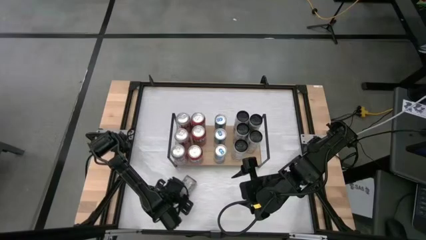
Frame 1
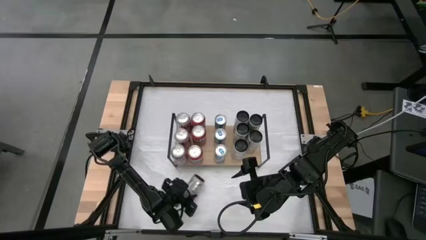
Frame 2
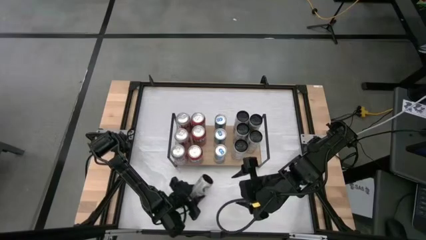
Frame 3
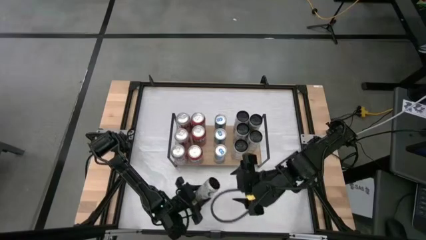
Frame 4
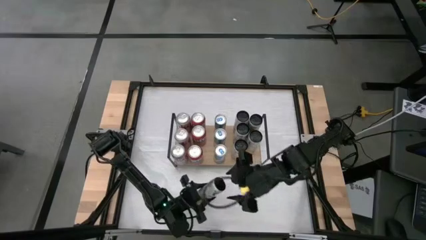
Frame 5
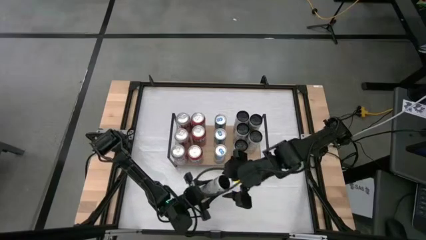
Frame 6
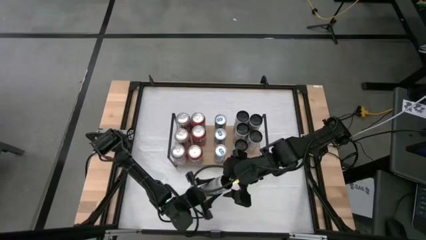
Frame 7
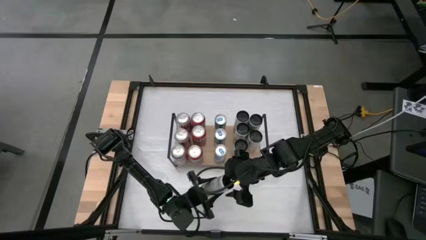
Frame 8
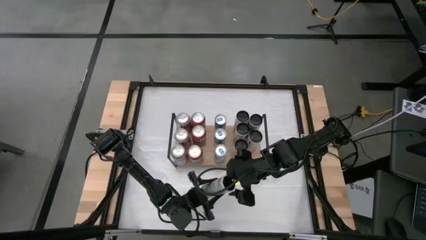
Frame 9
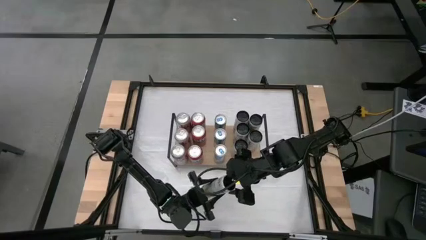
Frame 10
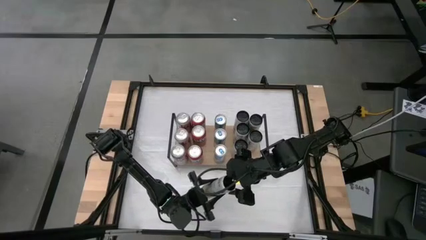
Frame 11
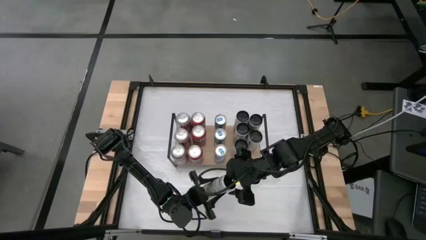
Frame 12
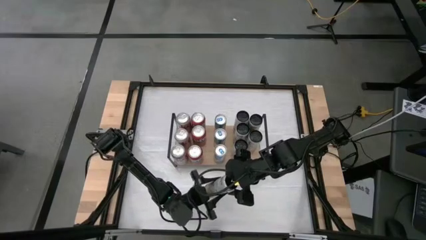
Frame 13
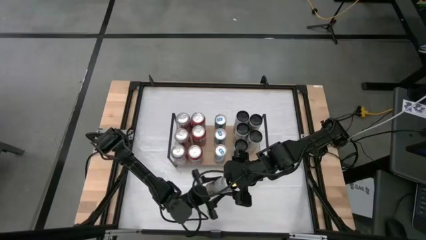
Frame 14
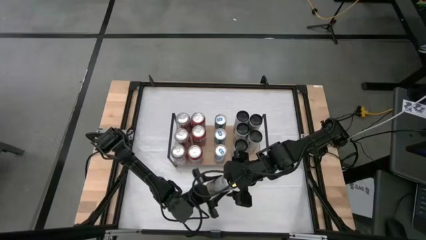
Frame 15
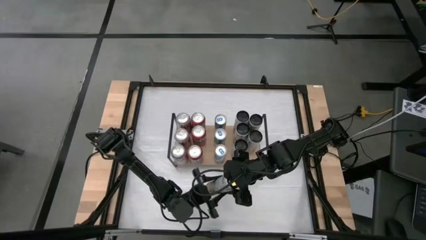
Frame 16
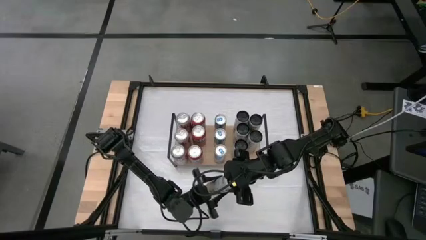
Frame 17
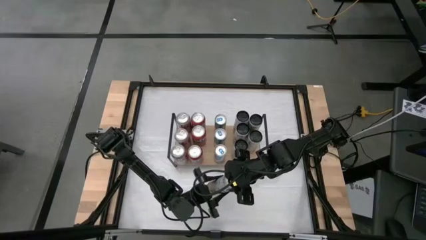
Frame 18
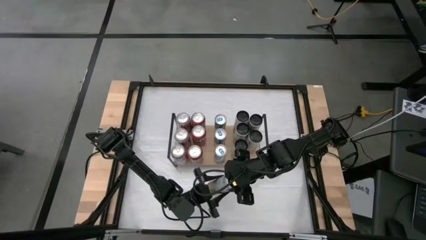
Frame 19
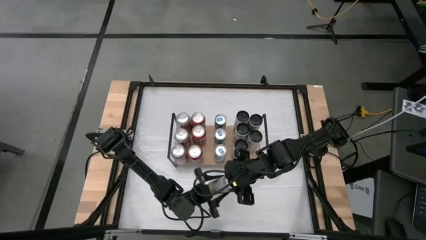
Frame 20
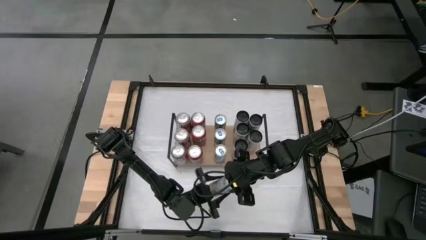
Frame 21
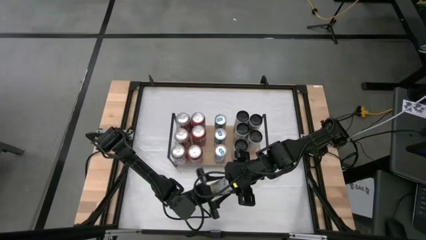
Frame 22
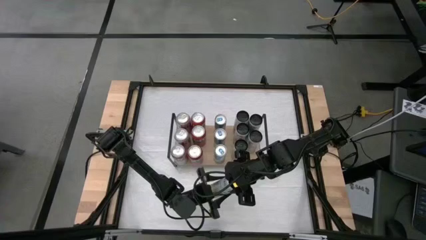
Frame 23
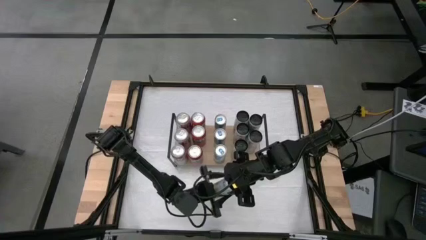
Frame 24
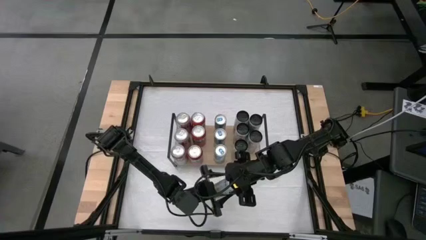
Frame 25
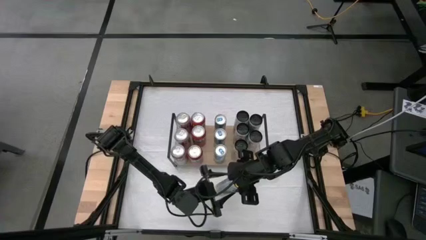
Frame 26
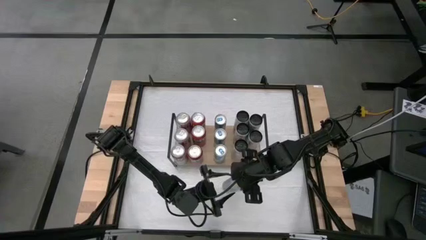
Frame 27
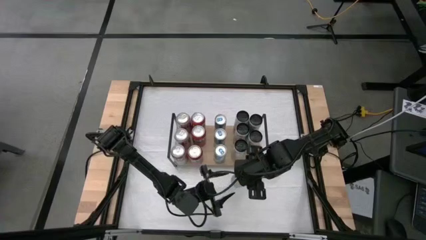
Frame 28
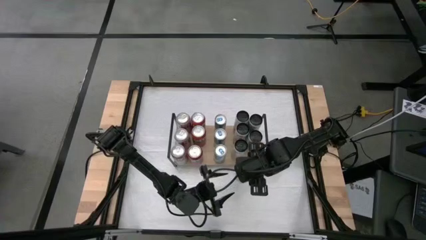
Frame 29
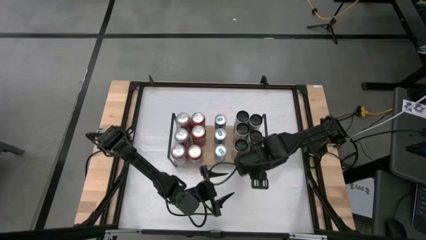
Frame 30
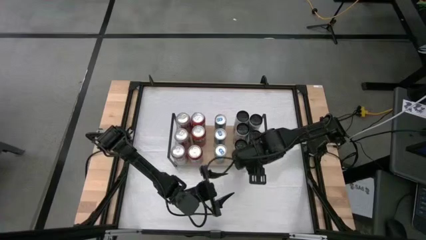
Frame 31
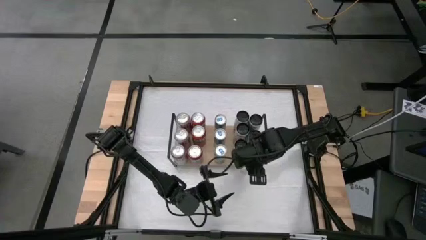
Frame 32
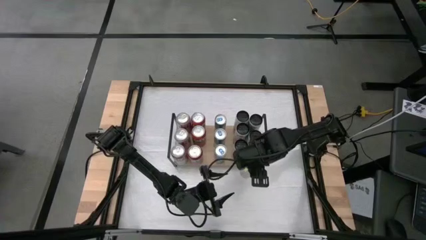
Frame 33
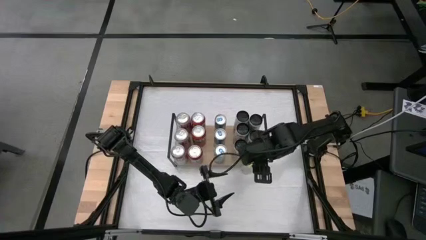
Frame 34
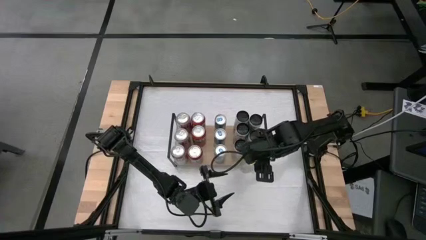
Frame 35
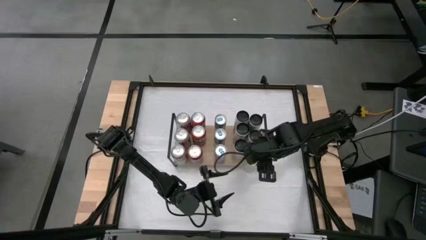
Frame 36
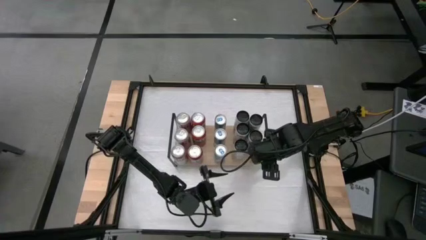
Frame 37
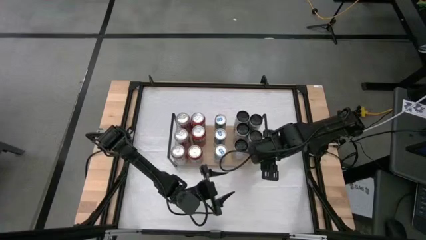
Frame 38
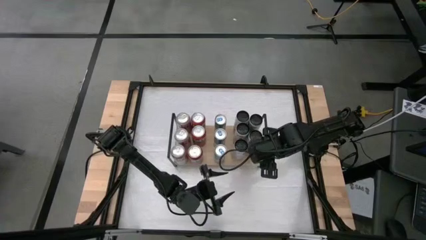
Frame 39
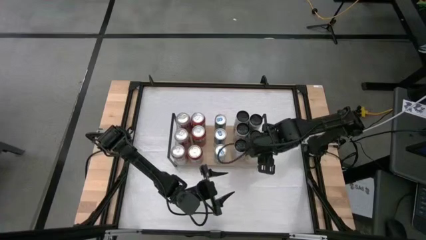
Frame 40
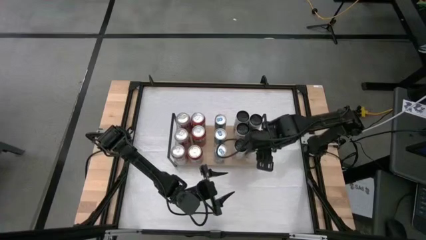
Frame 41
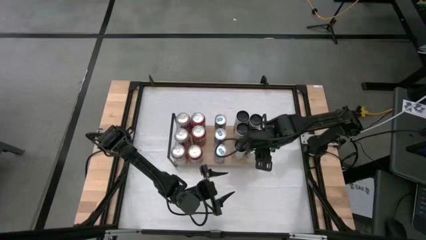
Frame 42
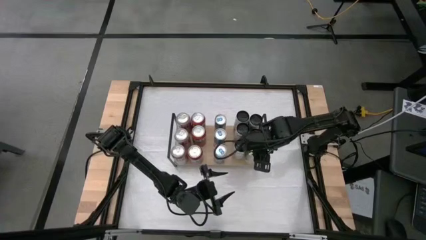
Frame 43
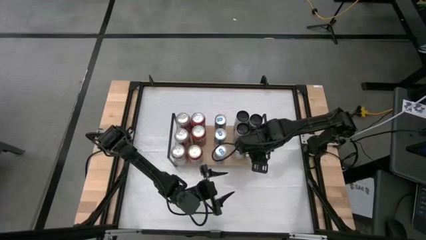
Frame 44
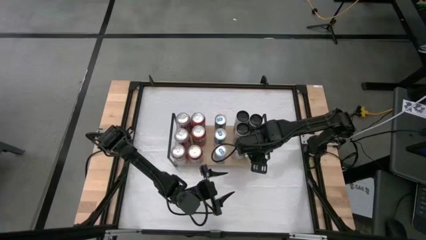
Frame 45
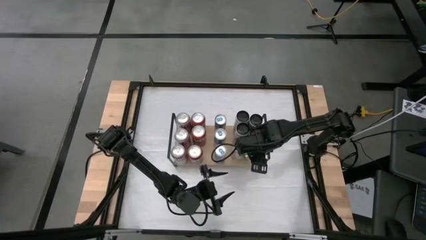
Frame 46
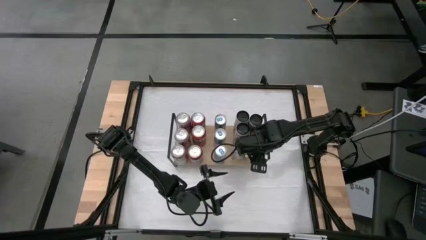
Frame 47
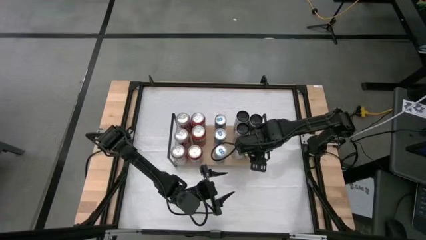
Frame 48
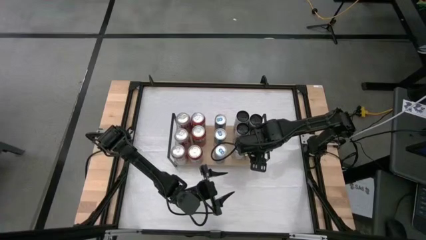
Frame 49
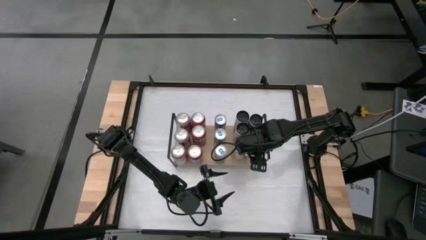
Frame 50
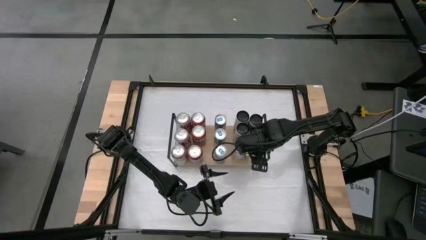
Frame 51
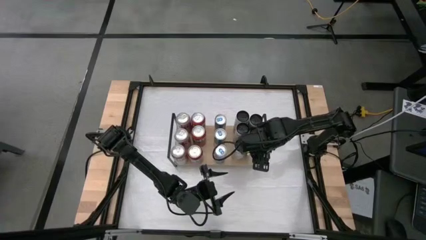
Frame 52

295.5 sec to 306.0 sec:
Task: Place canned beverage on shelf
Put the white-yellow soda can on the shelf aligned with the other white-yellow soda can
